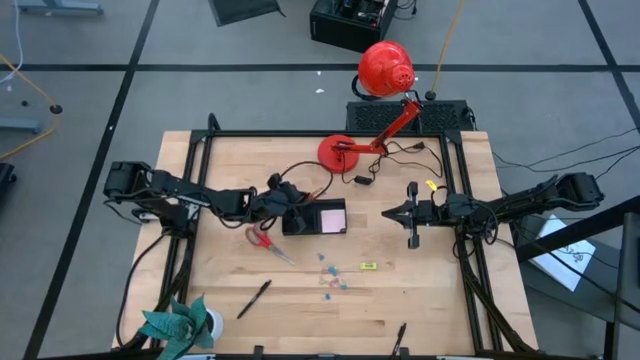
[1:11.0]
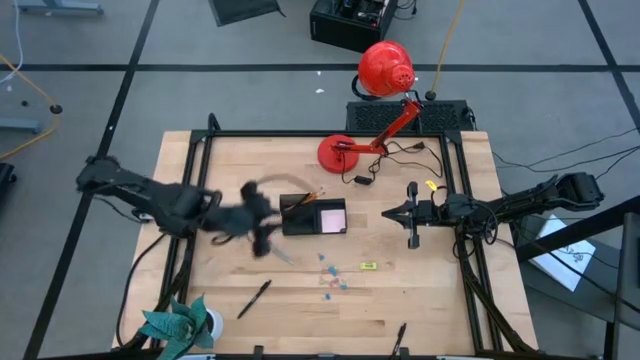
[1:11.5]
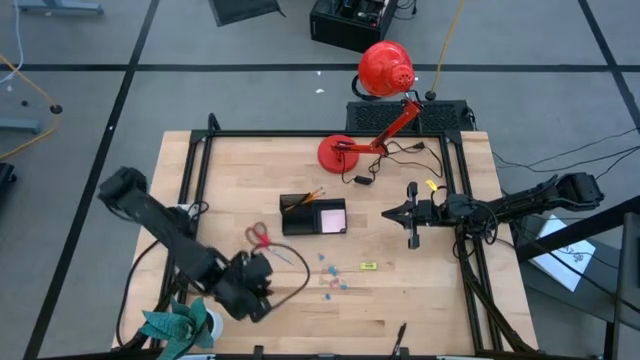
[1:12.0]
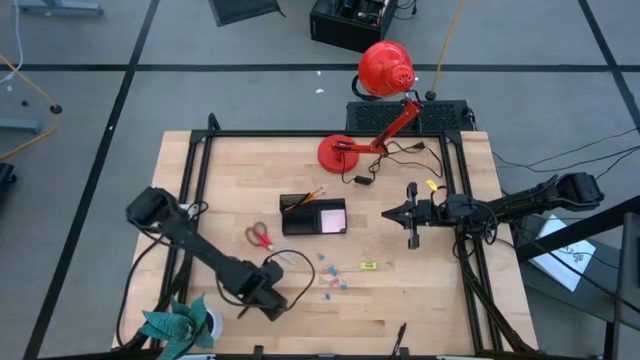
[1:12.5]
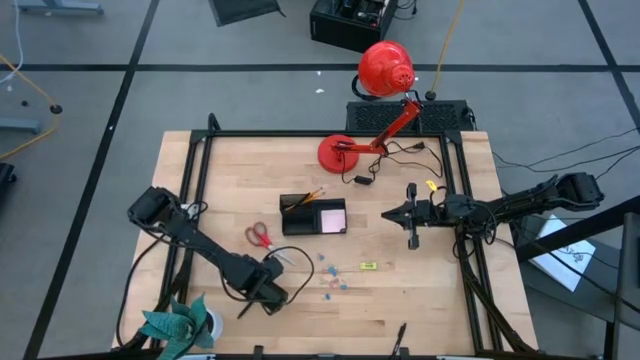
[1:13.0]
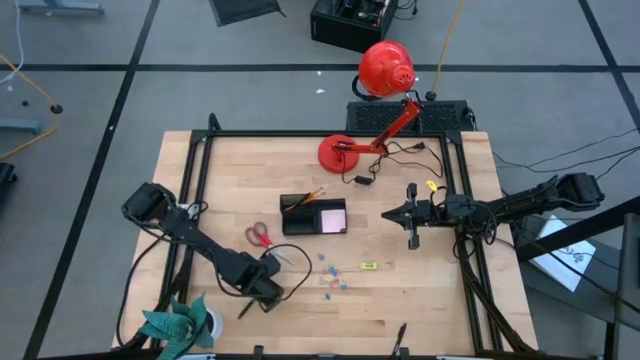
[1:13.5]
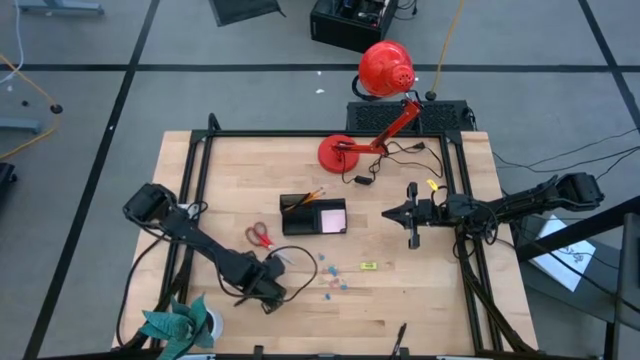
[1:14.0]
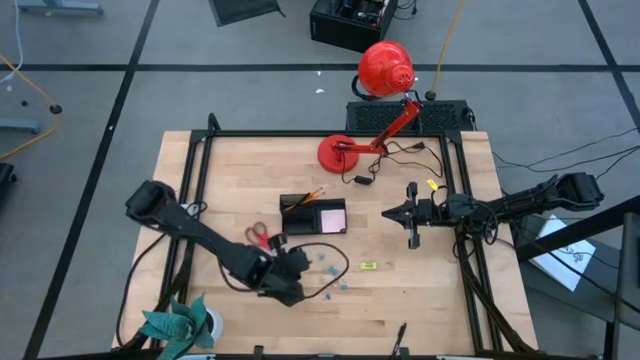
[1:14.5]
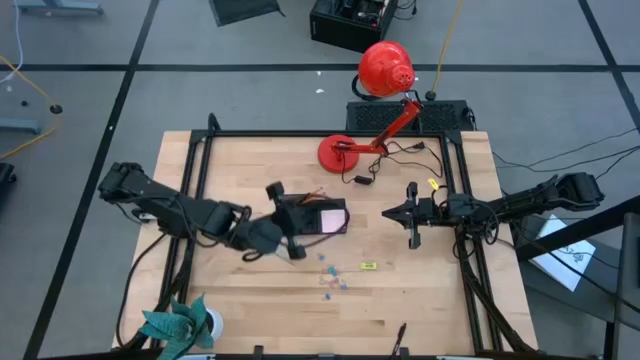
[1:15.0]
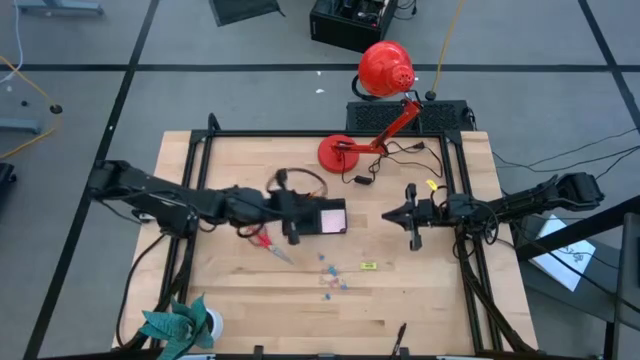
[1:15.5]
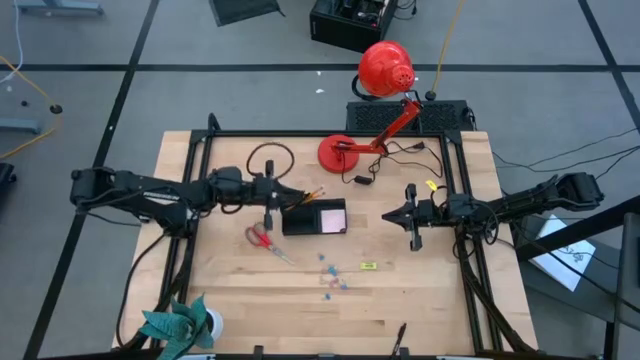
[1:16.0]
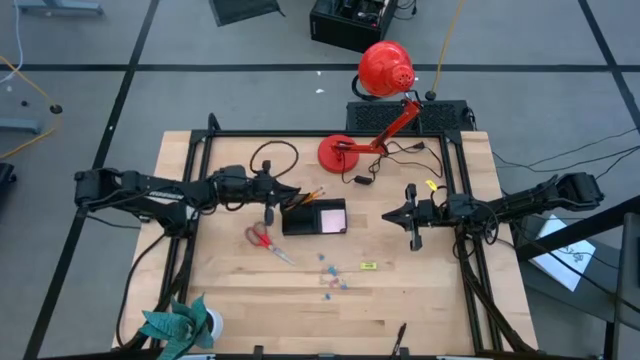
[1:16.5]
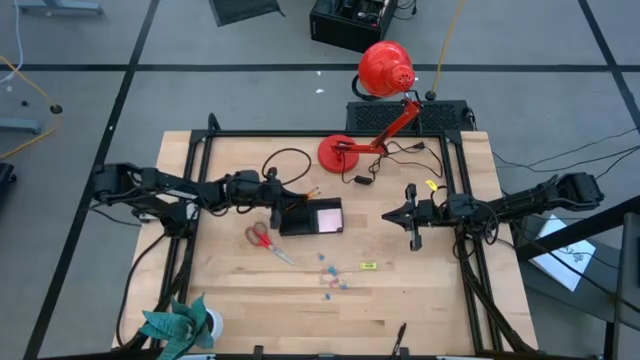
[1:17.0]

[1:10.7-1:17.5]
Task: Pick and place office supplies into organizer
Put the black pen into the mesh desk organizer

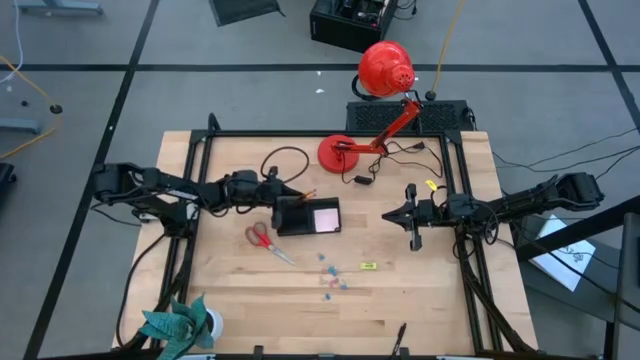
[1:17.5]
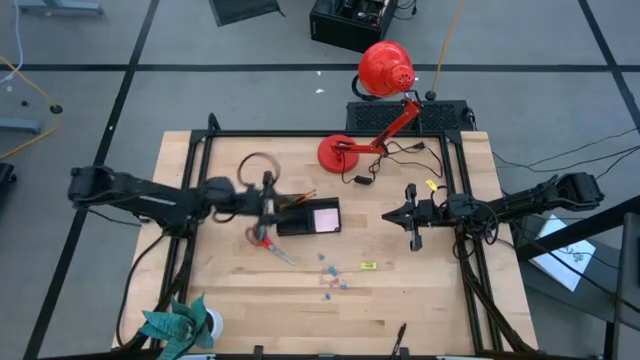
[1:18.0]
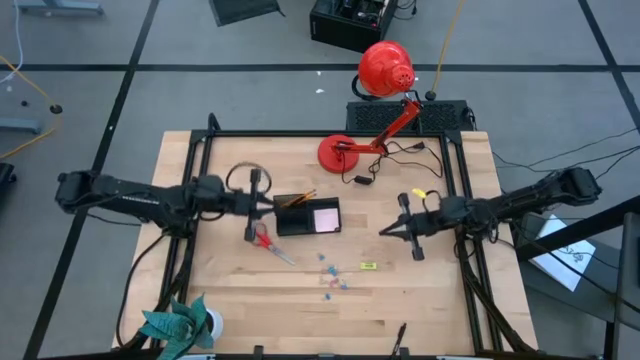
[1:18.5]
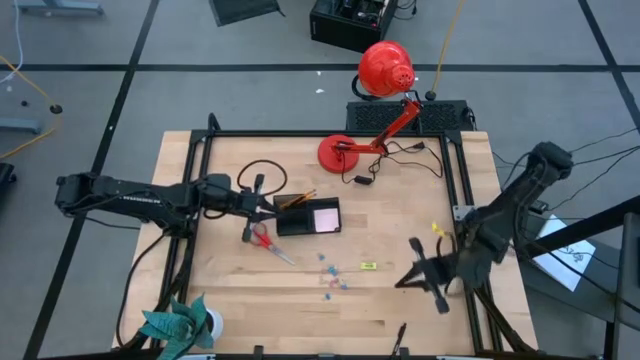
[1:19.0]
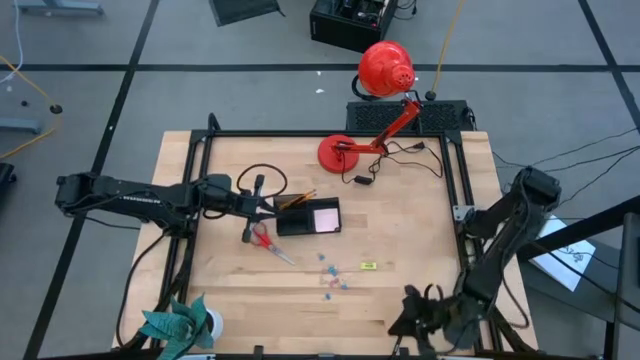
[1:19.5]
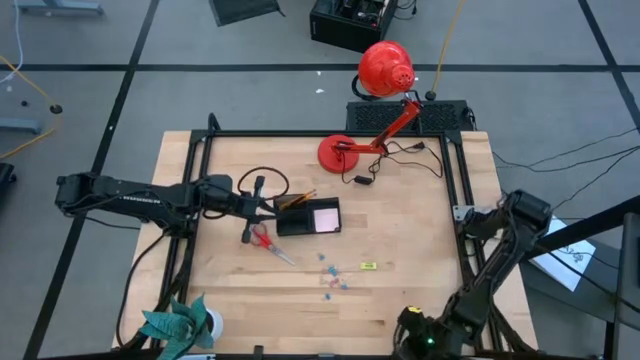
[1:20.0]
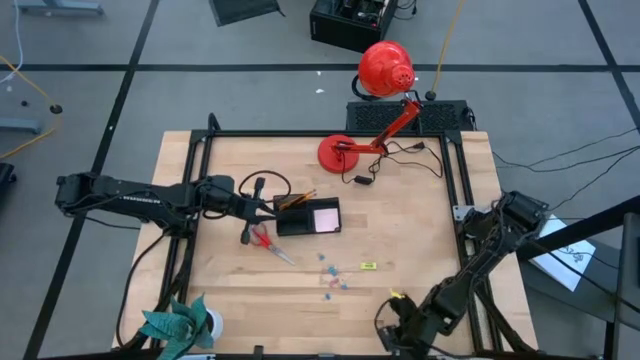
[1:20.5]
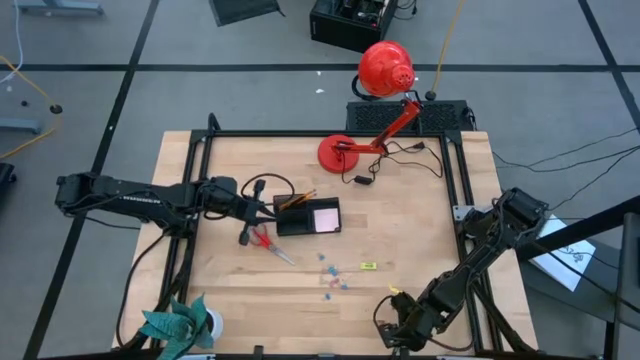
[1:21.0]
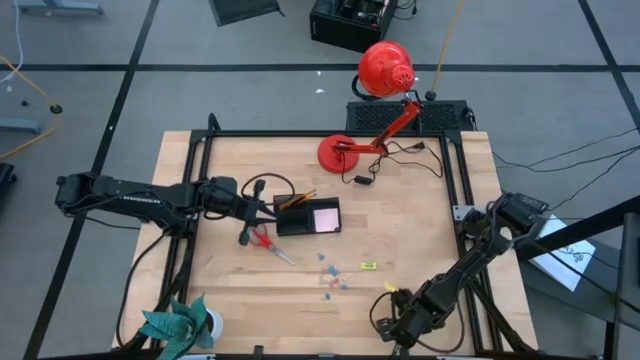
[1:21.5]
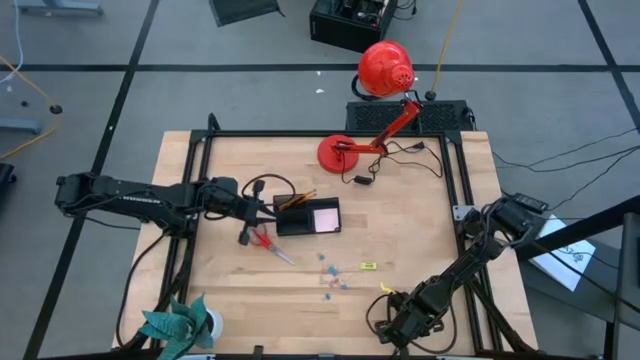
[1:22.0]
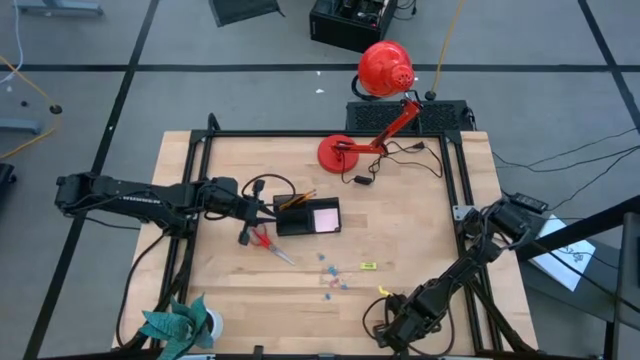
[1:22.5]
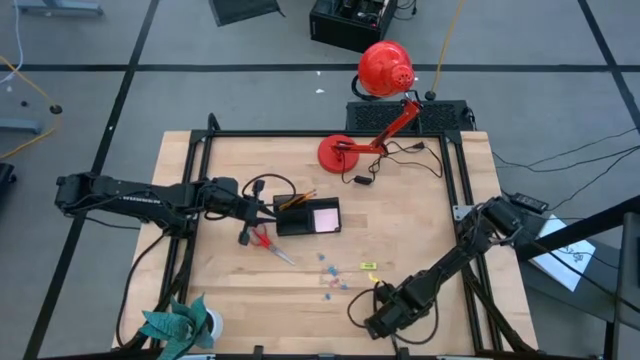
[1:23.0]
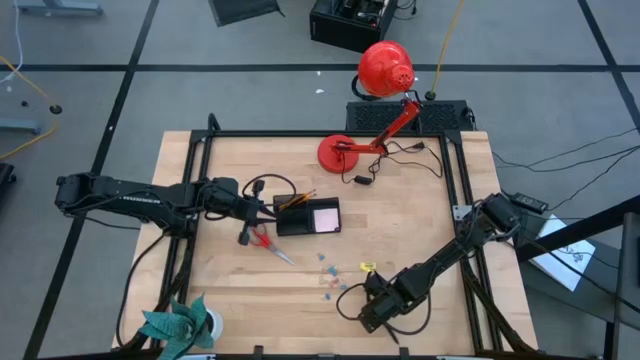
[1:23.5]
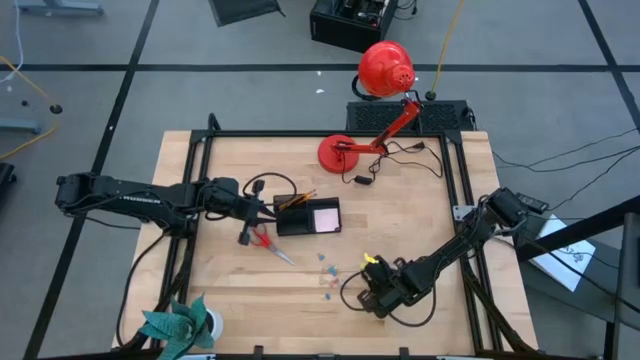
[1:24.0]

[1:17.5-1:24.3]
Put the black pen into the mesh desk organizer

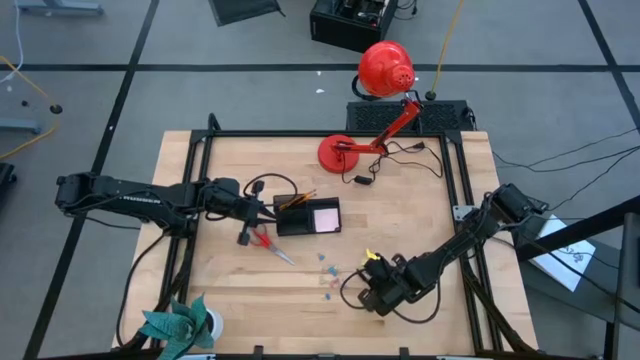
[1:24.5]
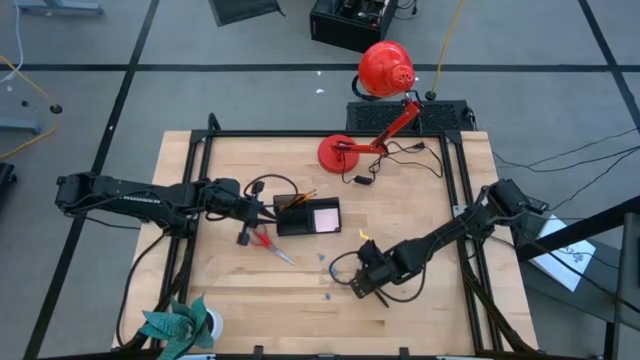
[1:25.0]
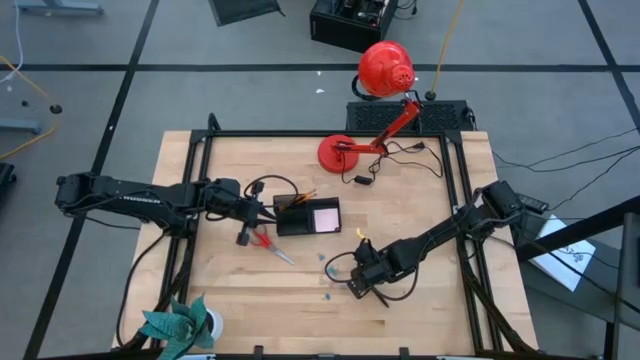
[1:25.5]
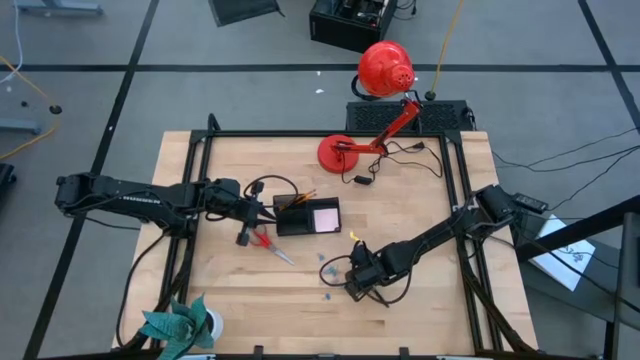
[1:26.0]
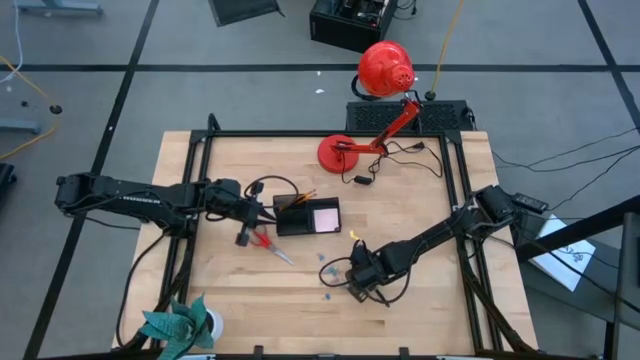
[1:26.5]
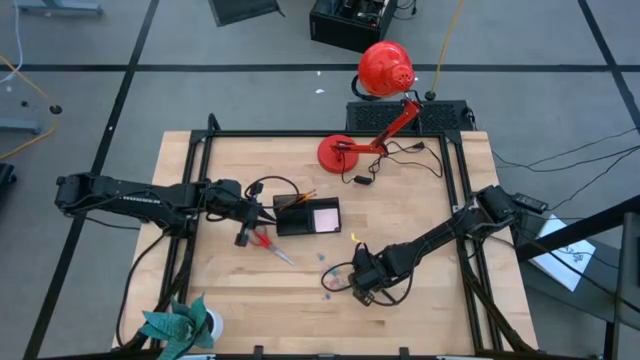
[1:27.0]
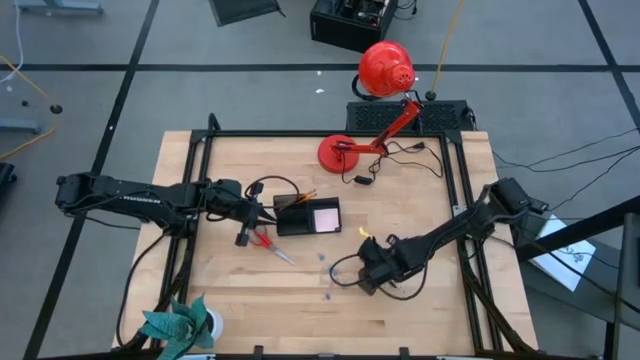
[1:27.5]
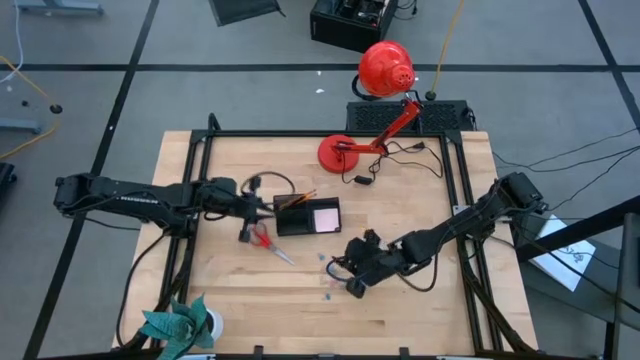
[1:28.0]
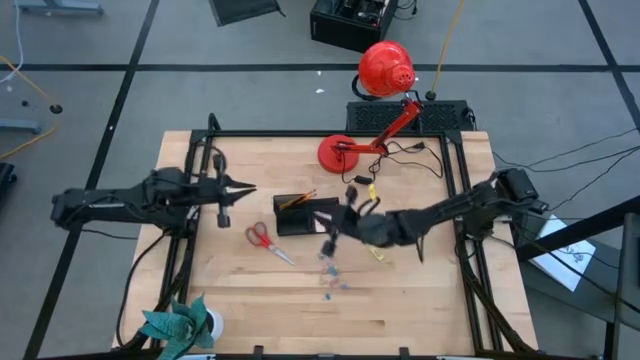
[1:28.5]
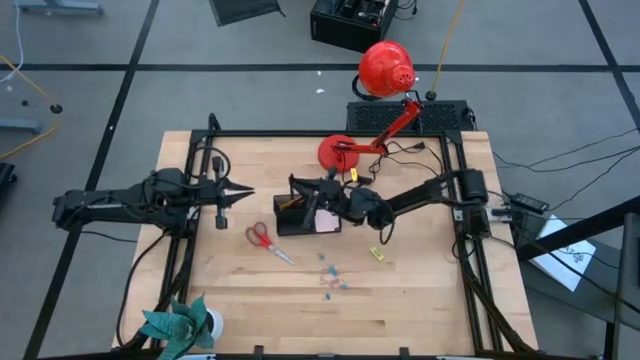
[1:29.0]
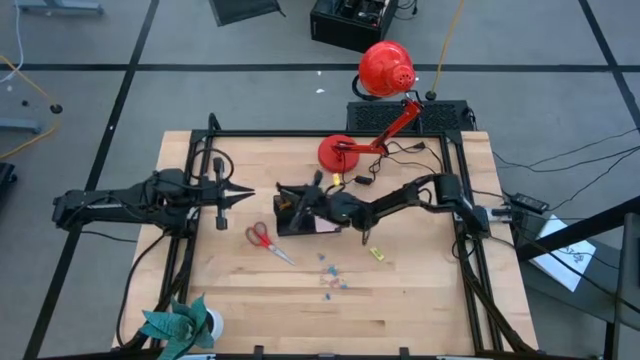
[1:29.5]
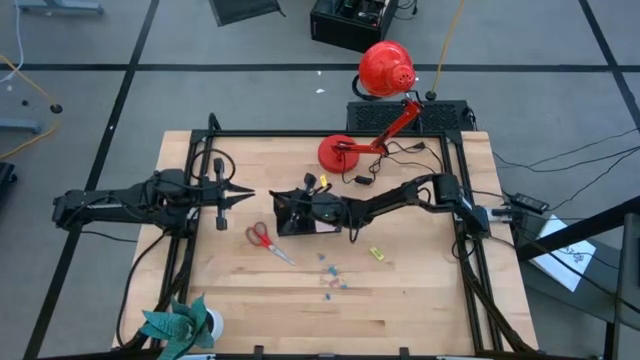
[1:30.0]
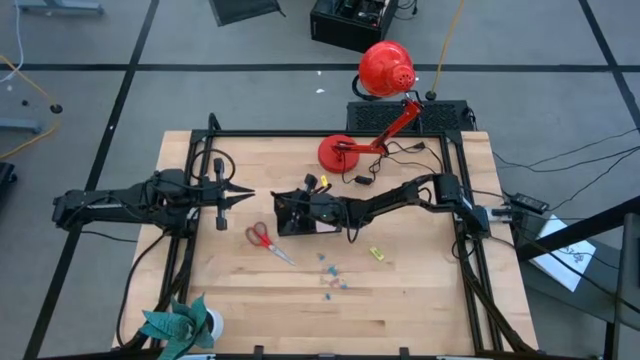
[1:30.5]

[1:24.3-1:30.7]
Put the black pen into the mesh desk organizer

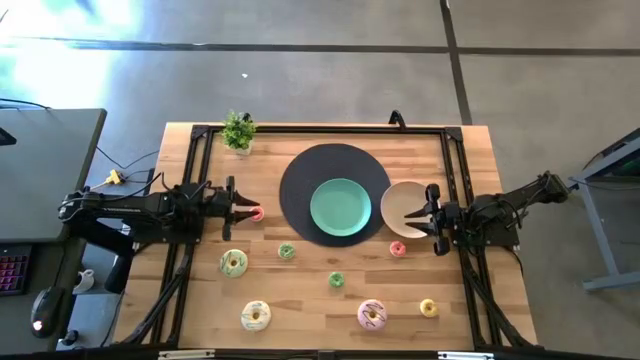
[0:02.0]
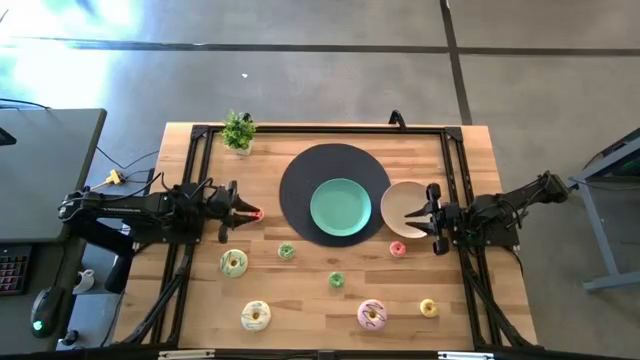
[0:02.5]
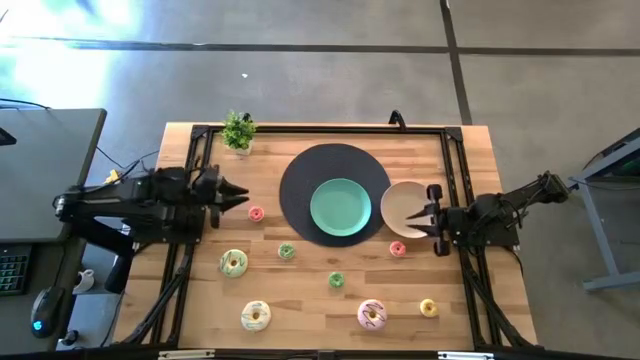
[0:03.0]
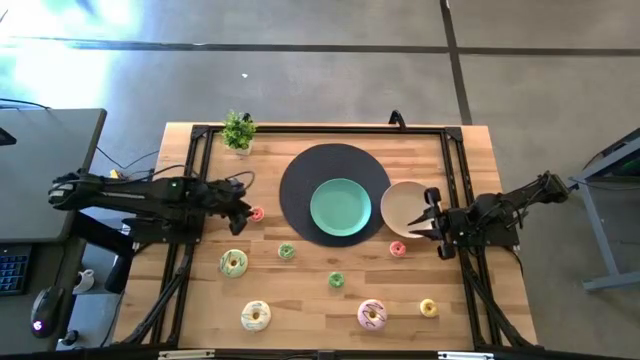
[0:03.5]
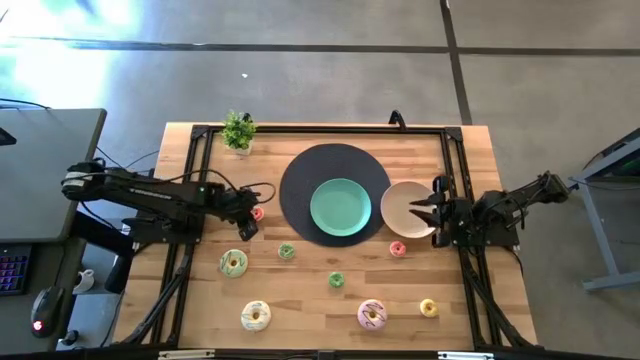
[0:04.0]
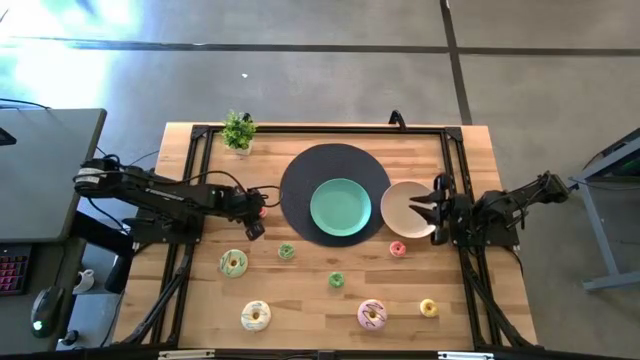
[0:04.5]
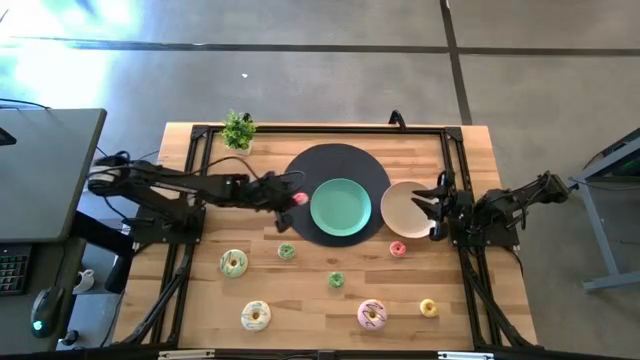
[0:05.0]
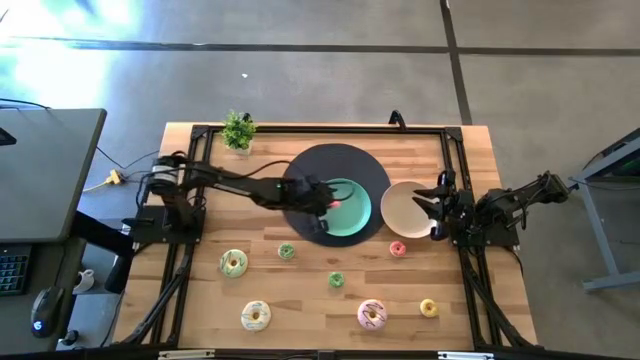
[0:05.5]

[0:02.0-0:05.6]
Task: Pick & Place donuts
Put the small pink donut into the blue plate
